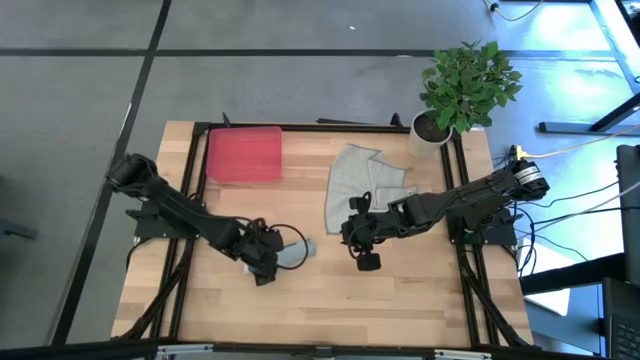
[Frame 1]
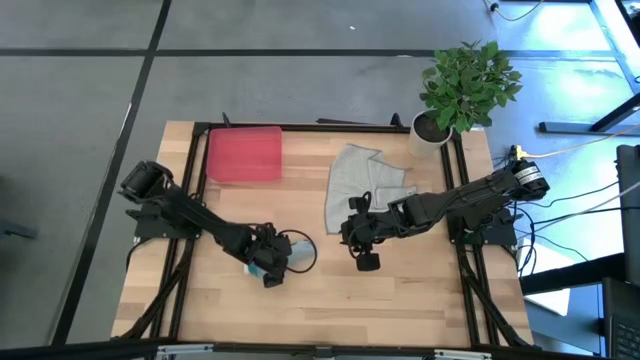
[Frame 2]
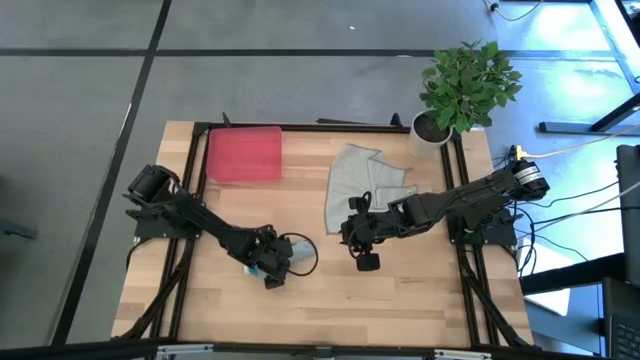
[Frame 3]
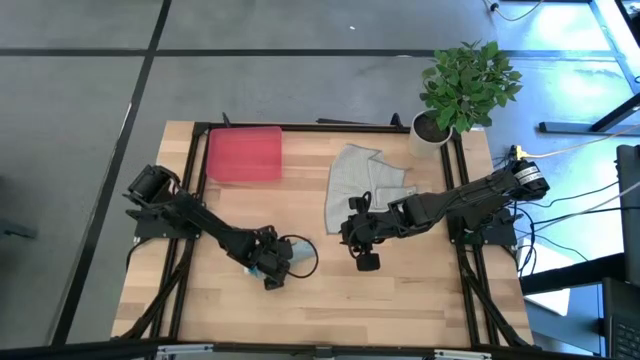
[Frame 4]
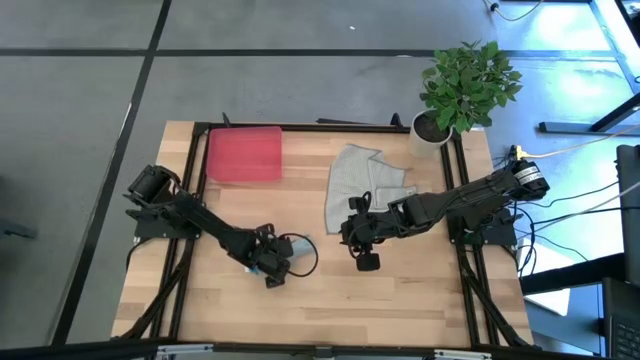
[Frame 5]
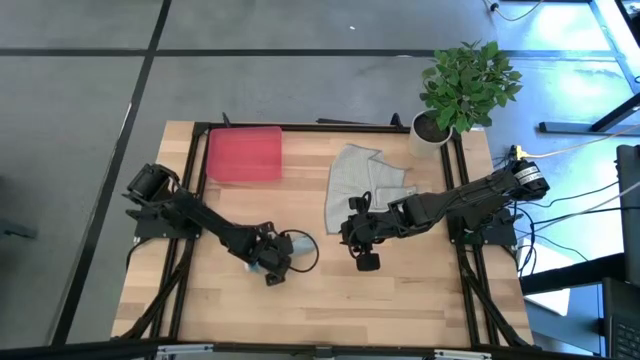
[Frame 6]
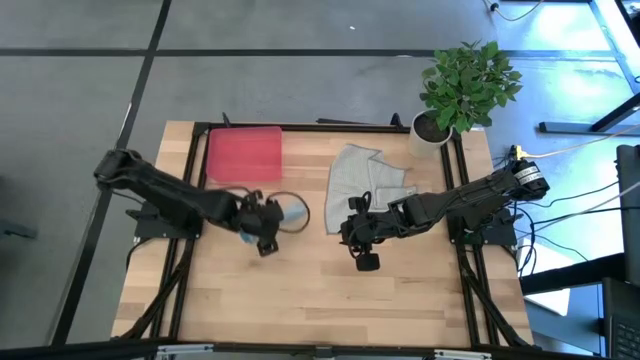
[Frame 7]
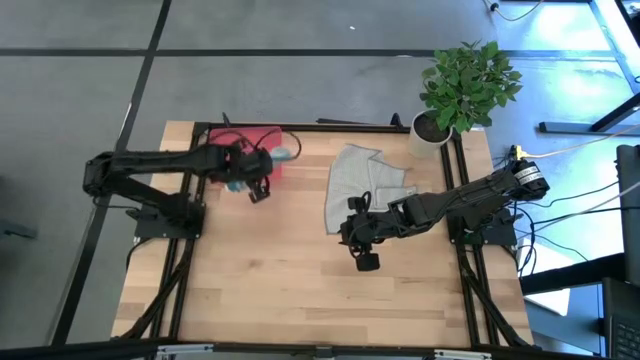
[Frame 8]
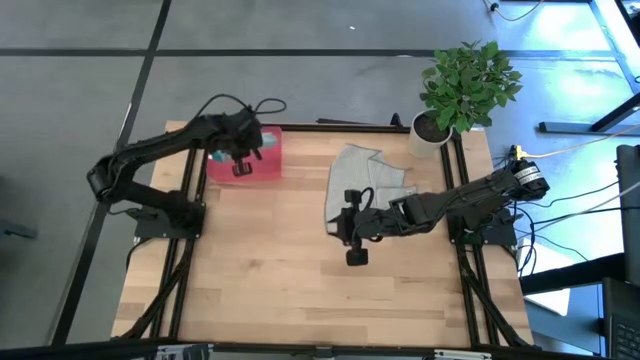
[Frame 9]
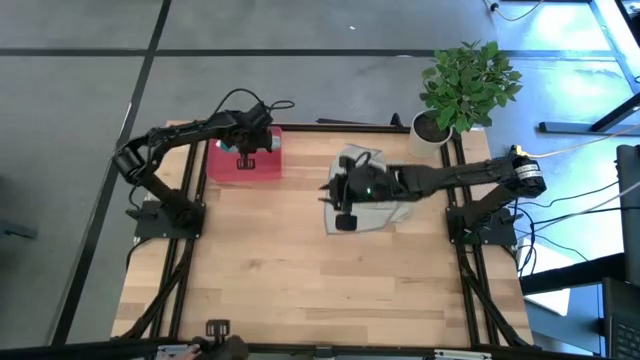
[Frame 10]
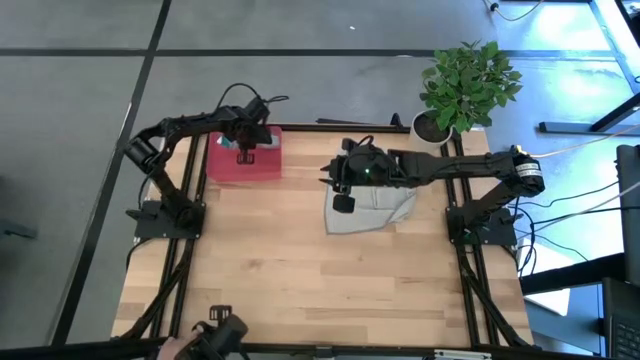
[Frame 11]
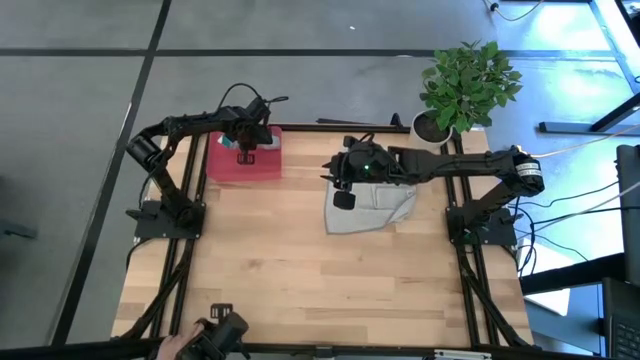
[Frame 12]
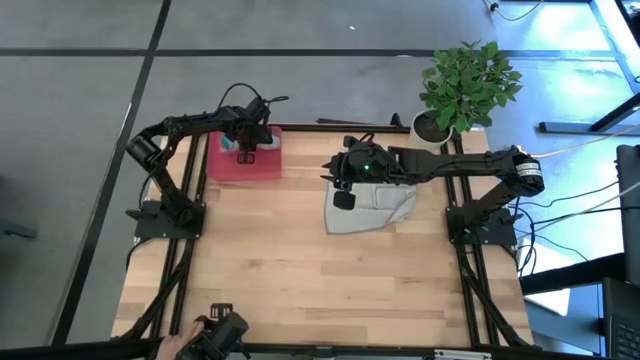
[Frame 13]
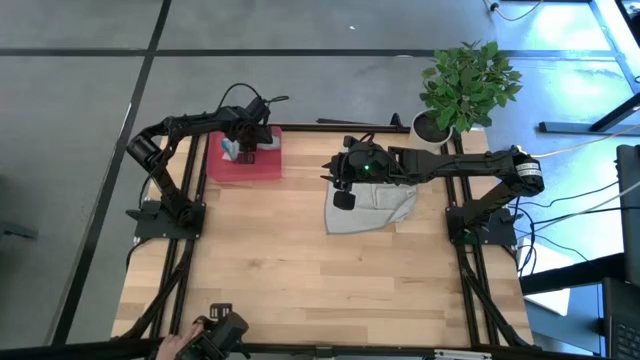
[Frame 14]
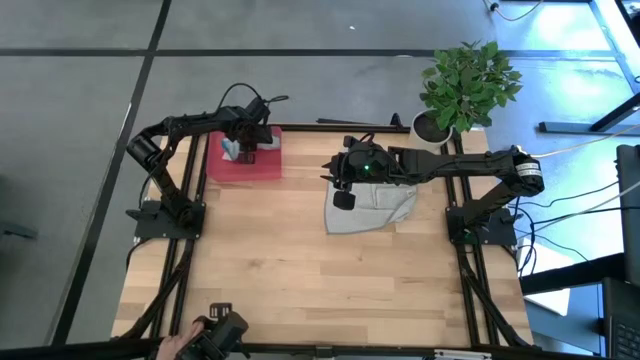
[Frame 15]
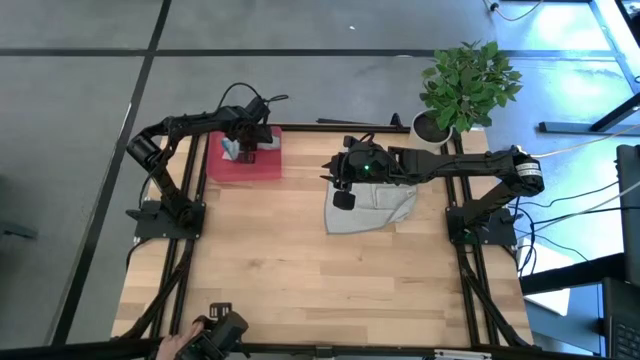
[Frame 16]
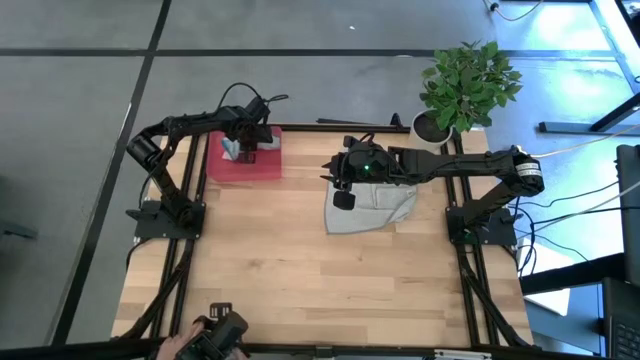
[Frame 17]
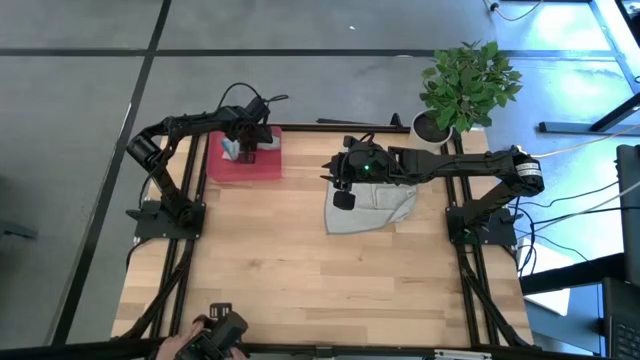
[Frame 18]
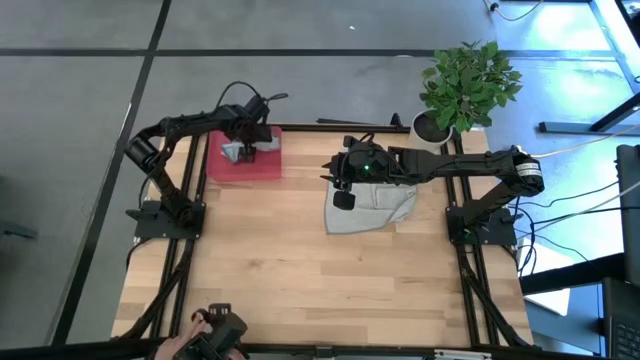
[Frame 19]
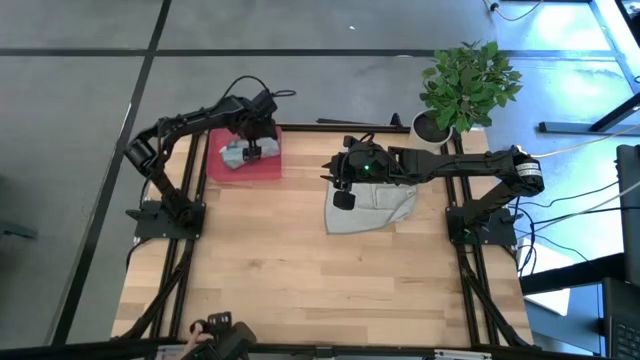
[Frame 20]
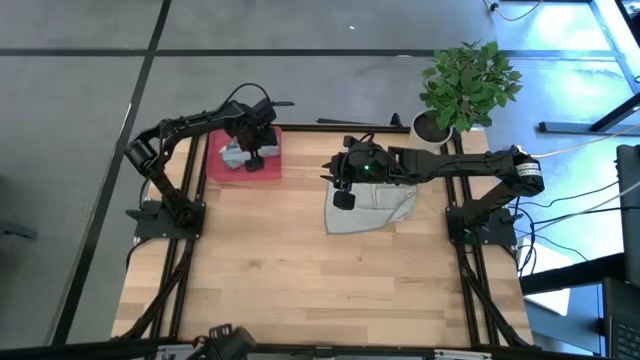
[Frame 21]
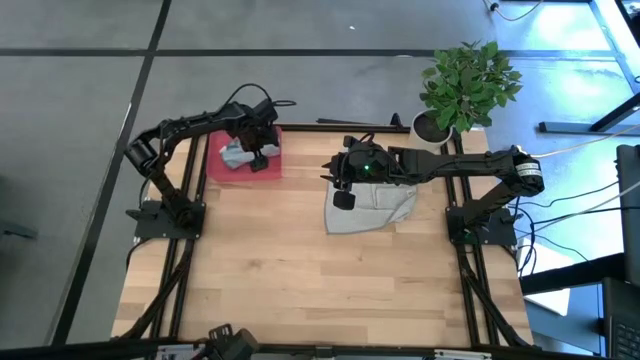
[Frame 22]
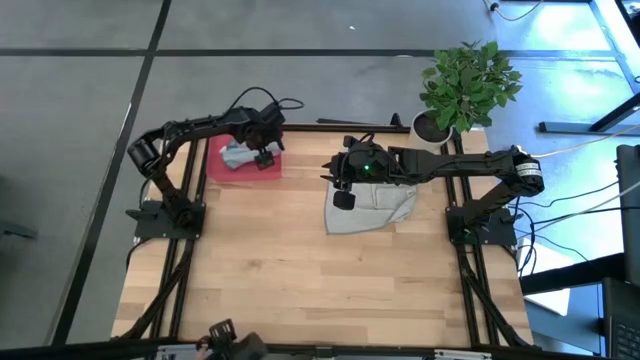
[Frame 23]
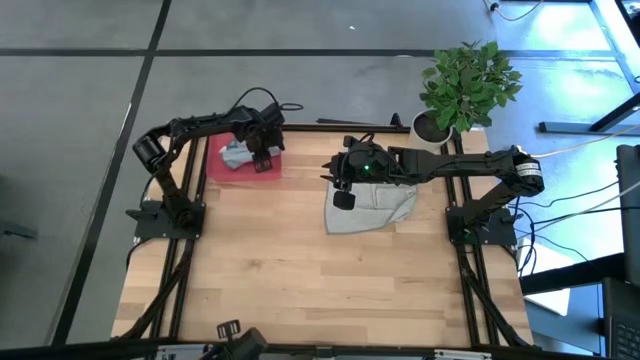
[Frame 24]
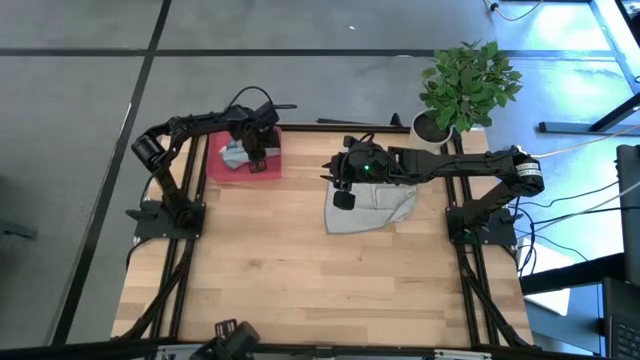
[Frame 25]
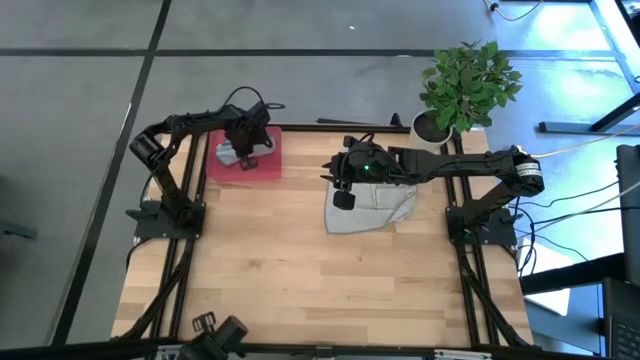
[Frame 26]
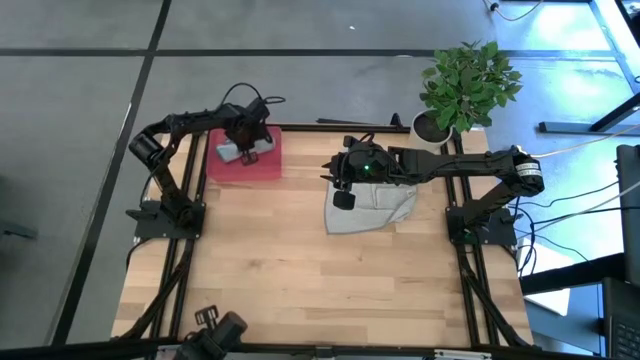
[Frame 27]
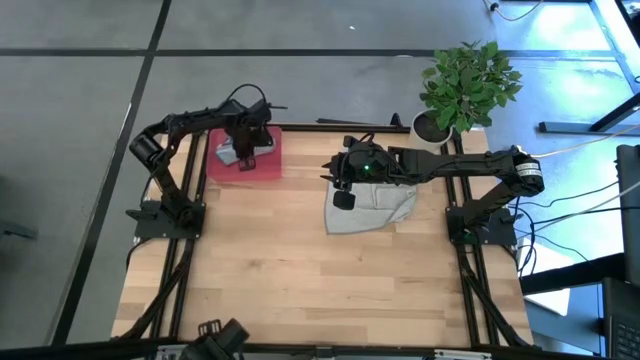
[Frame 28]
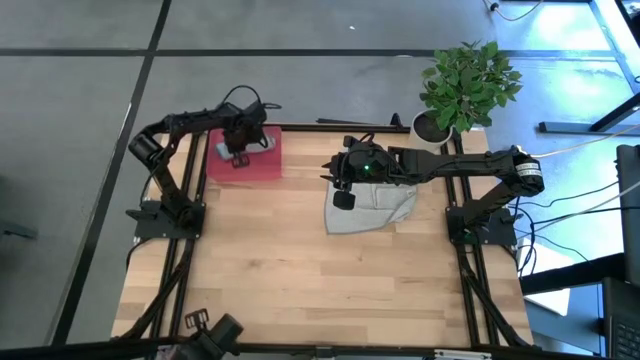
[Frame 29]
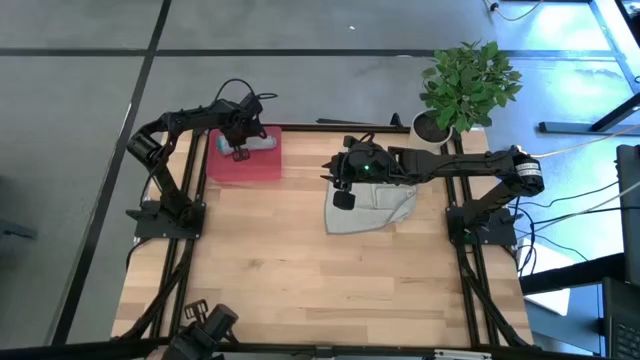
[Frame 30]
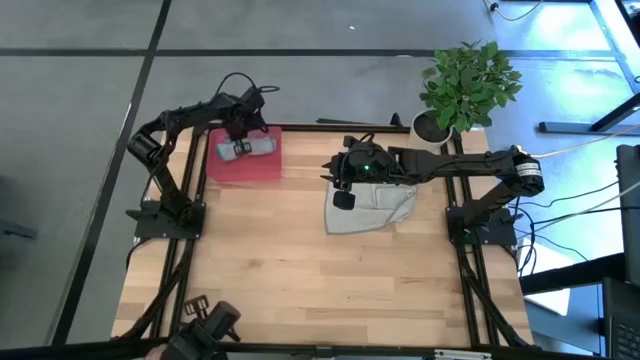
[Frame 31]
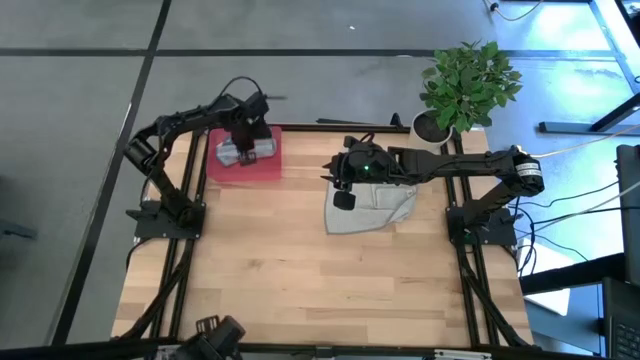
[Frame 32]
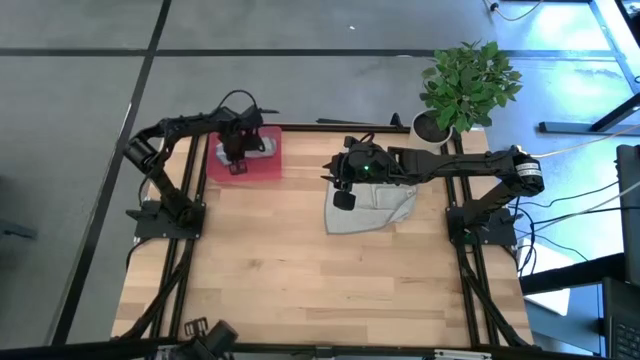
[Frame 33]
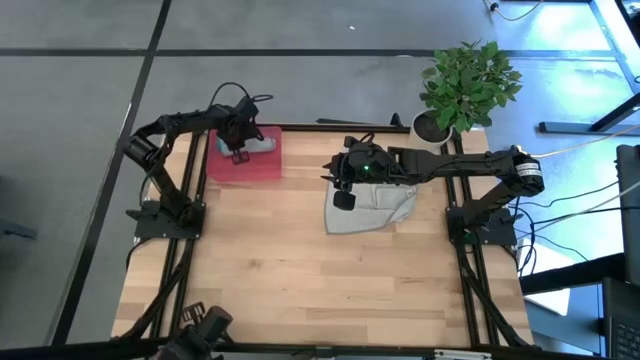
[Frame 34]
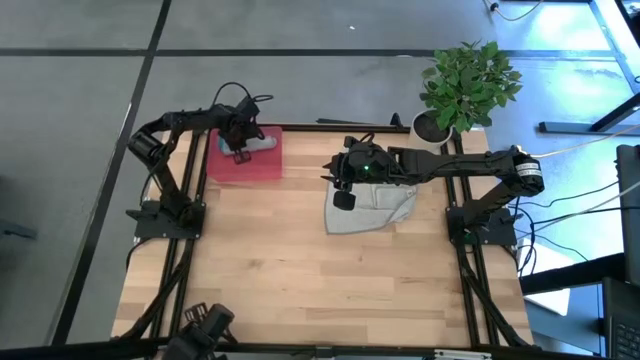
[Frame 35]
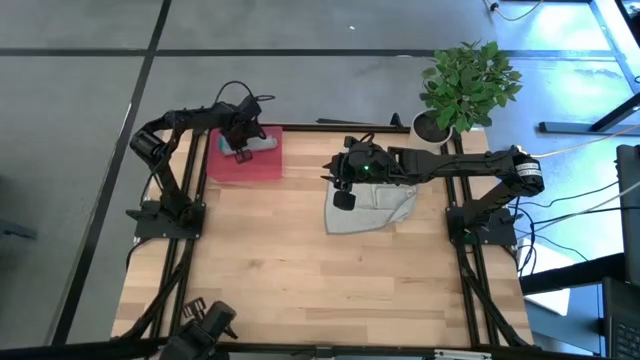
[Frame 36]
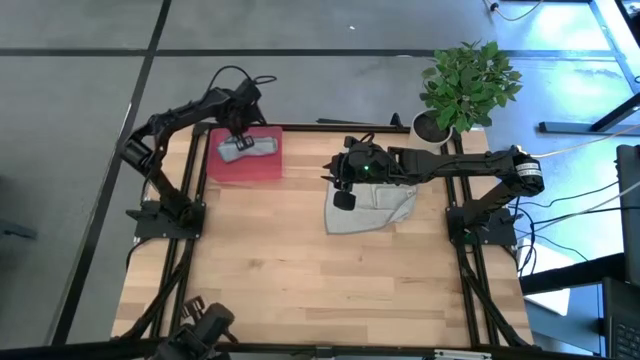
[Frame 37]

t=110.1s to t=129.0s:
Task: Roll microfiber towels into tight, uniform cylinder then place into a basket
Put the blue towel into the pink bin

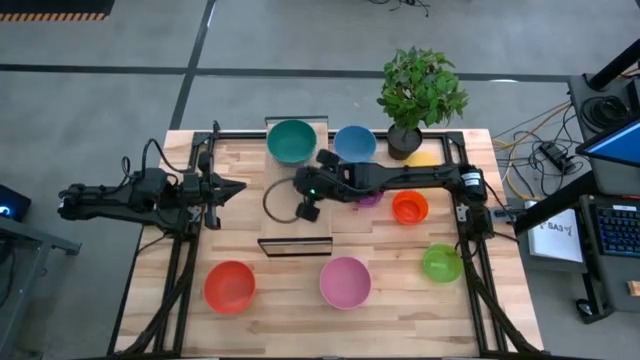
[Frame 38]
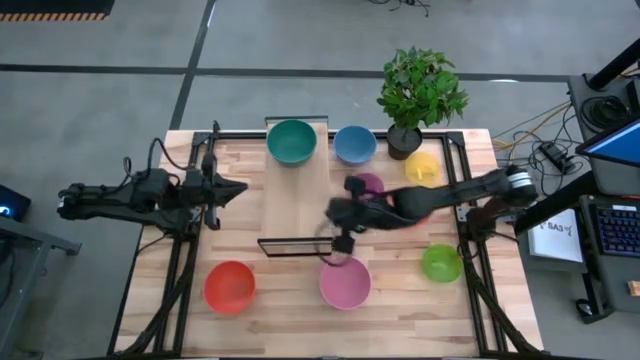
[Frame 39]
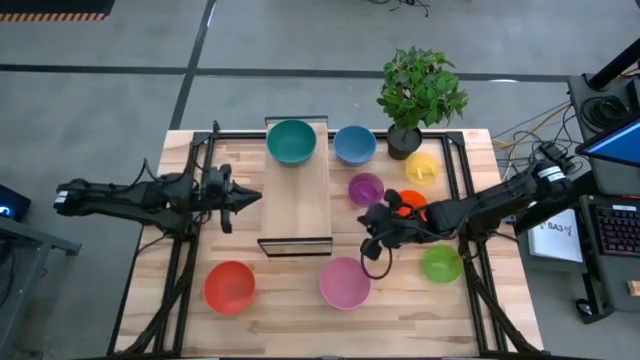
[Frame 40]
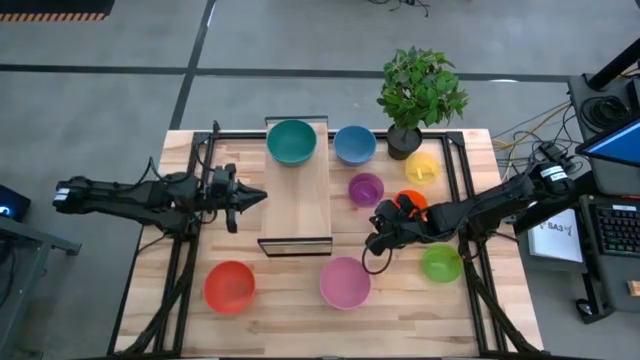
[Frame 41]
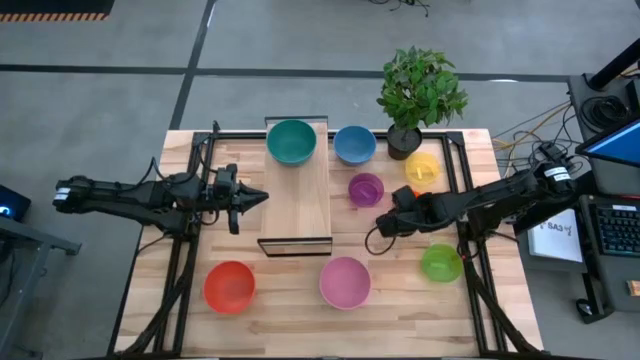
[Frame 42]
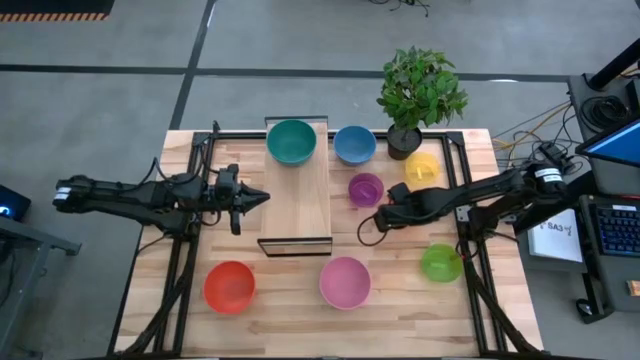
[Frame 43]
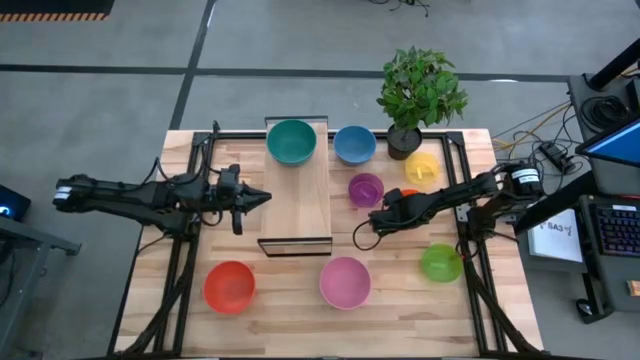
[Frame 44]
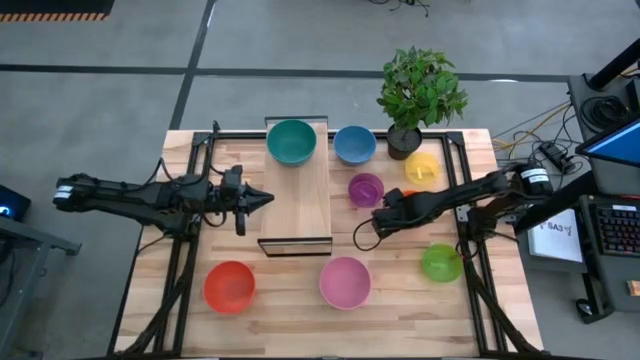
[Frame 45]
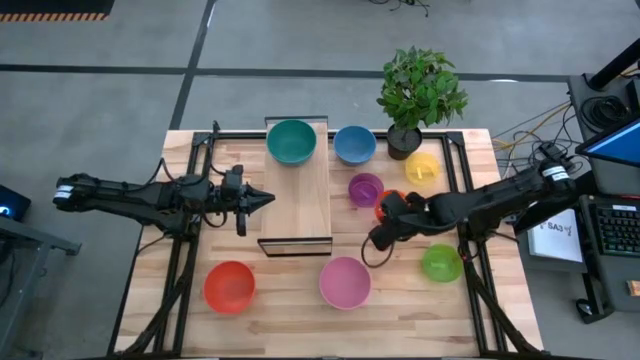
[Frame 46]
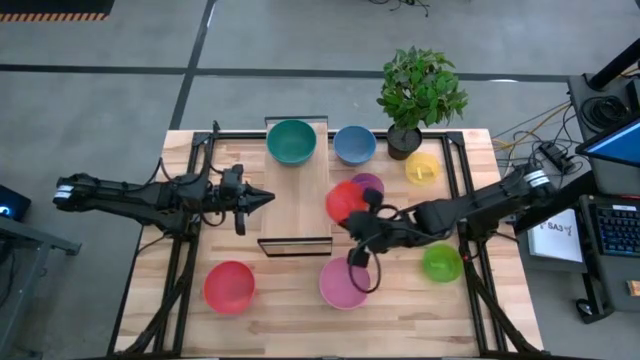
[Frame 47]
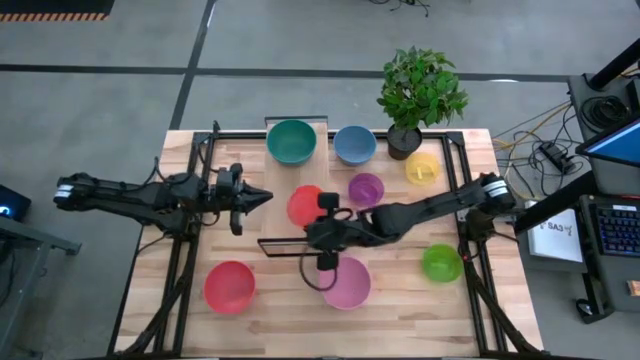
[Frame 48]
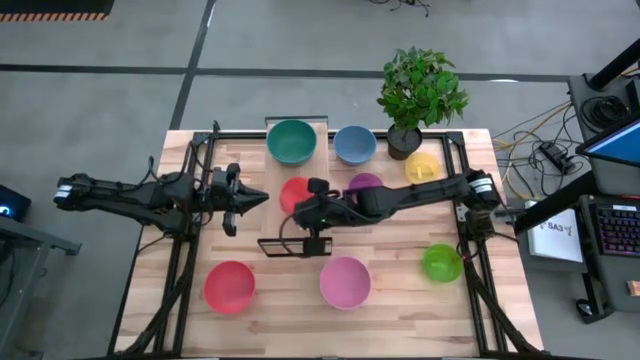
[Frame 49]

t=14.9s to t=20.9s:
Task: Place and stack bowls onto a shelf
Put the light orange bowl on the shelf
